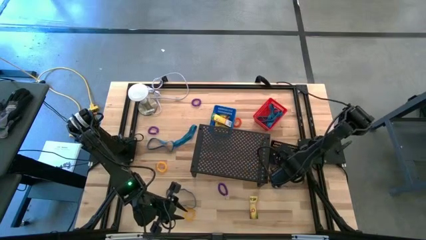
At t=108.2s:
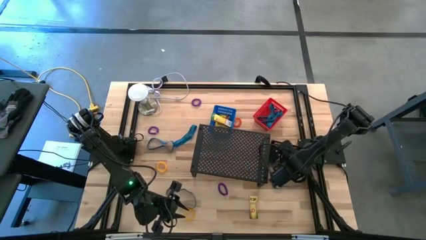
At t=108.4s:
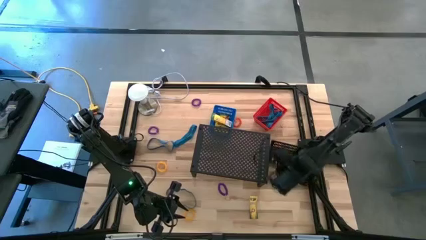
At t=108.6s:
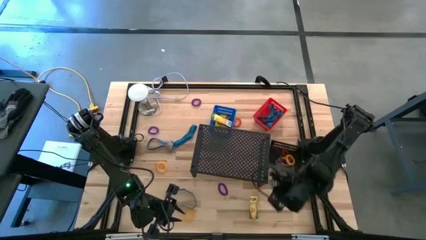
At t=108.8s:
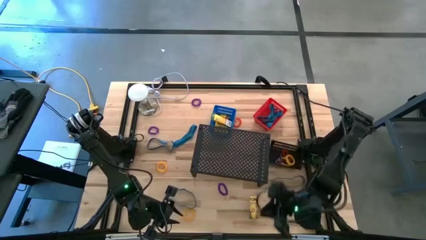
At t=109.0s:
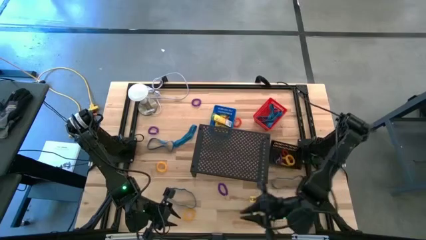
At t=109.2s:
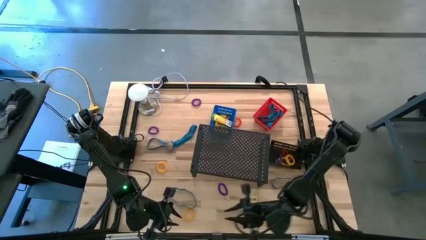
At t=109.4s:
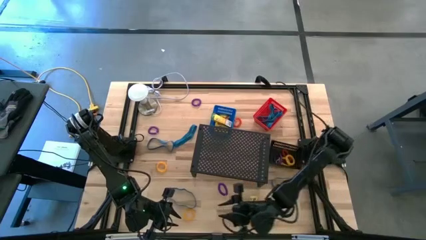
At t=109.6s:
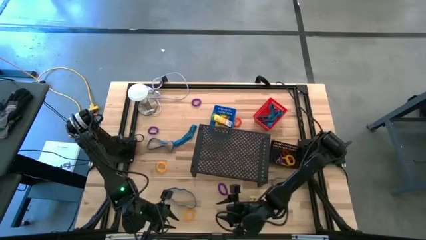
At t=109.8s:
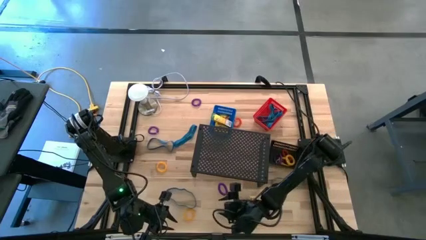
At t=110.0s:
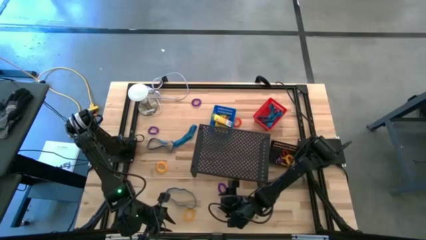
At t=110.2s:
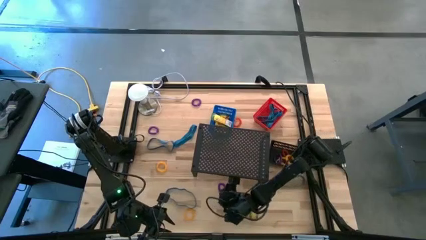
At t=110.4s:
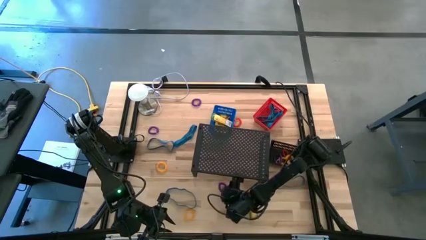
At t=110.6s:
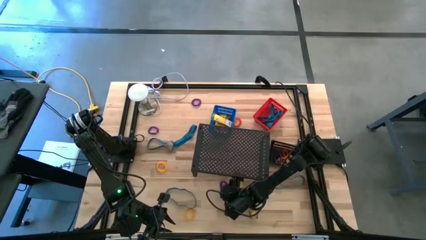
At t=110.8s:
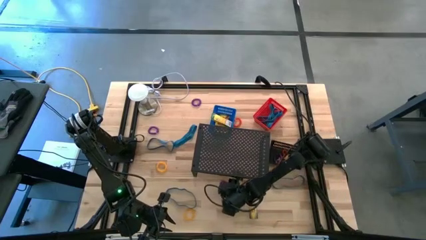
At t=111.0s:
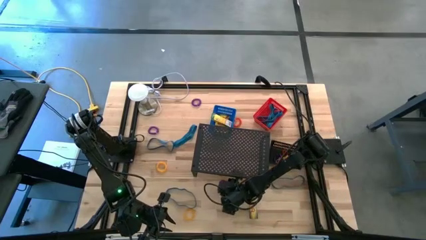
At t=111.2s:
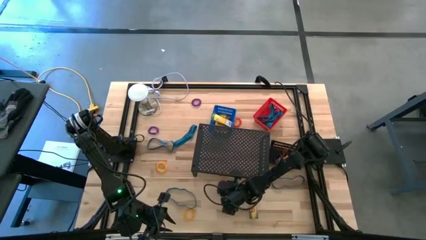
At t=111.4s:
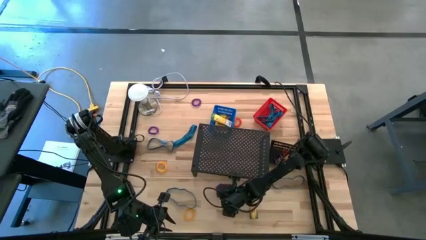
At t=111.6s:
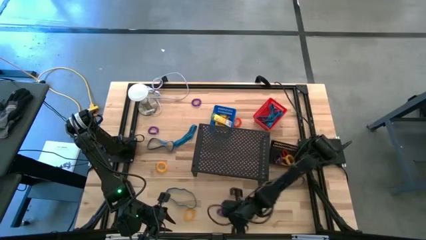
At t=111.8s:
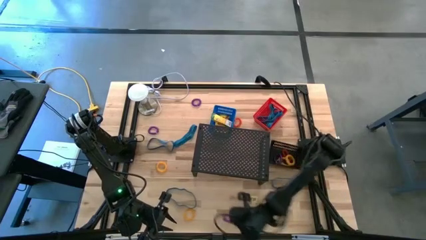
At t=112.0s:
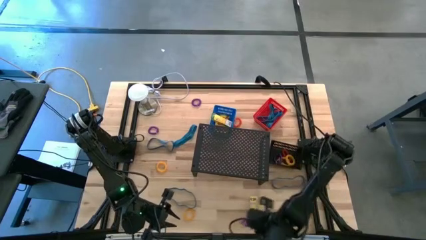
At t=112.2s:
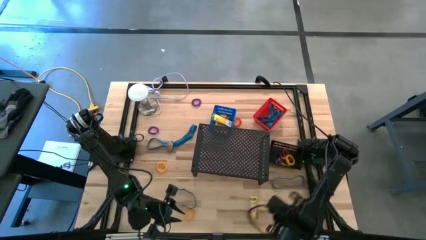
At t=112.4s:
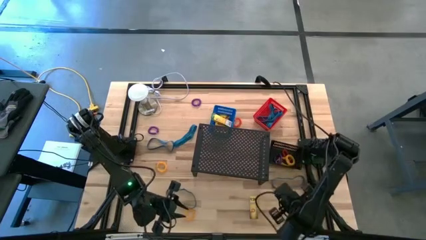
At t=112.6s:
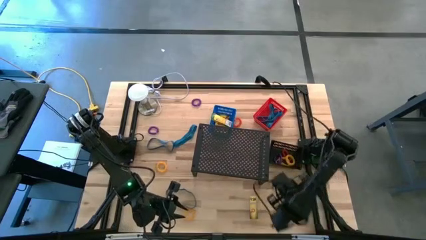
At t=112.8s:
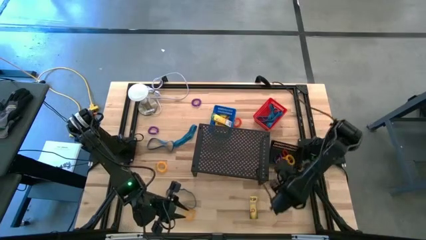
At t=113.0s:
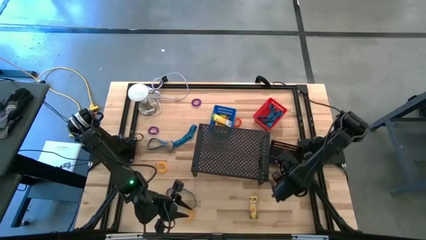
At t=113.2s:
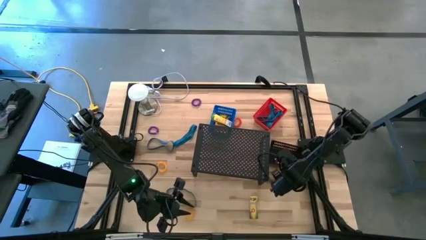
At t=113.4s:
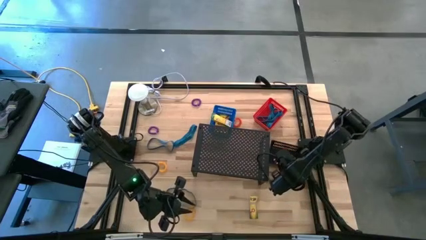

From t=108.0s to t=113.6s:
Task: Pick & Place Office Desk Supplies
Put the purple spiral keychain into the black bin

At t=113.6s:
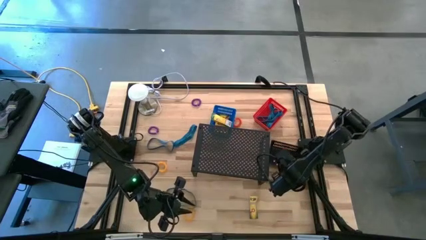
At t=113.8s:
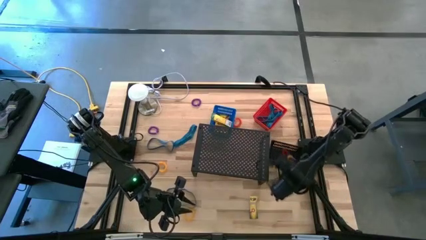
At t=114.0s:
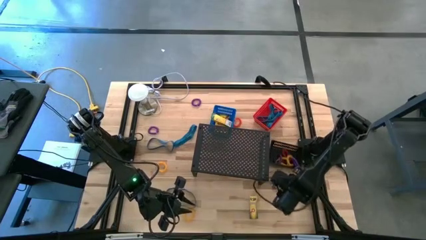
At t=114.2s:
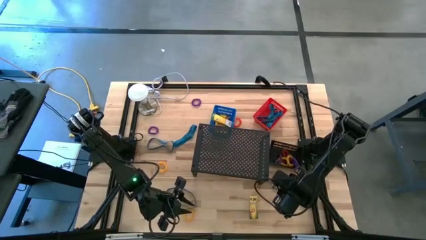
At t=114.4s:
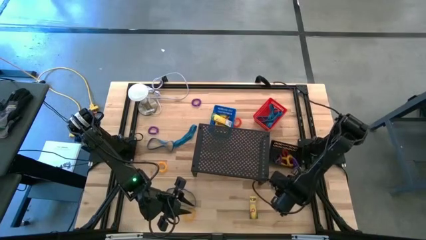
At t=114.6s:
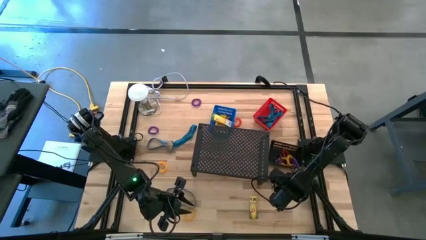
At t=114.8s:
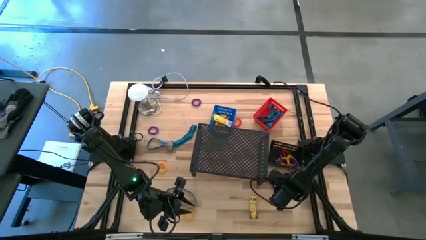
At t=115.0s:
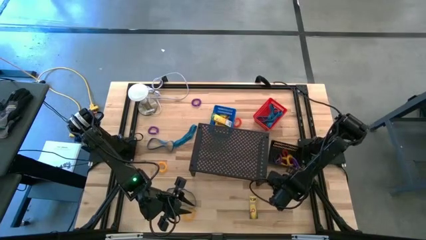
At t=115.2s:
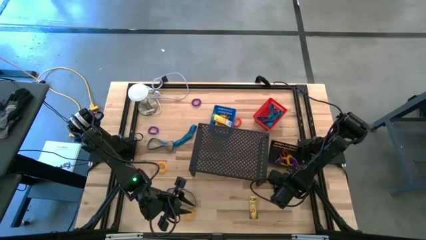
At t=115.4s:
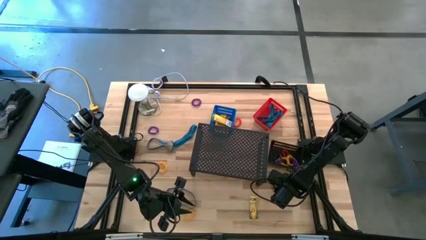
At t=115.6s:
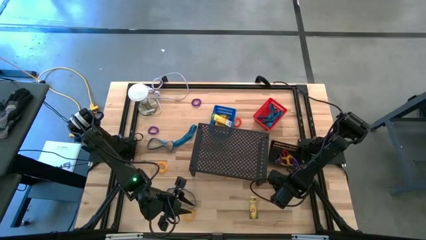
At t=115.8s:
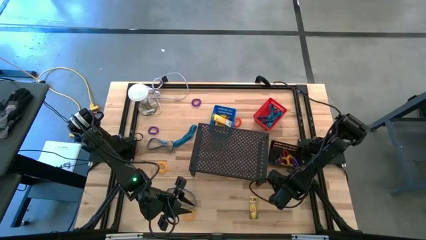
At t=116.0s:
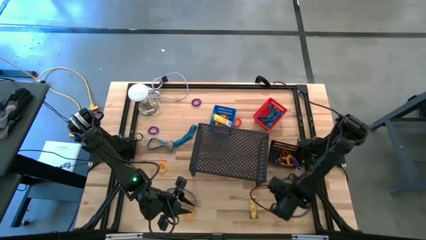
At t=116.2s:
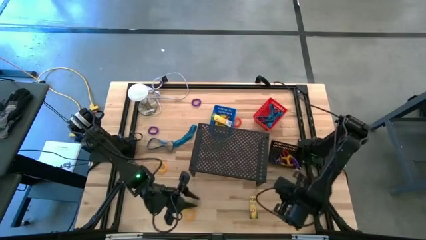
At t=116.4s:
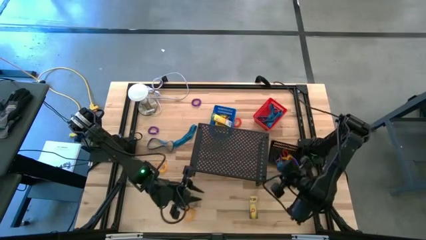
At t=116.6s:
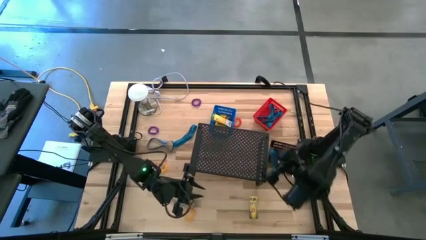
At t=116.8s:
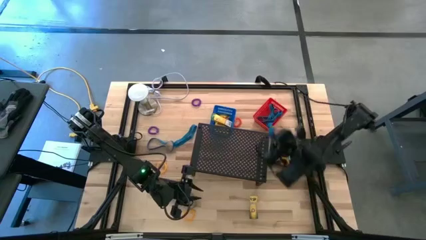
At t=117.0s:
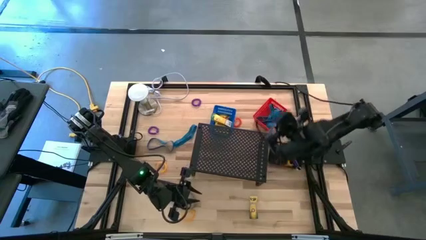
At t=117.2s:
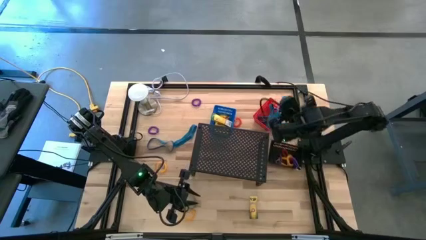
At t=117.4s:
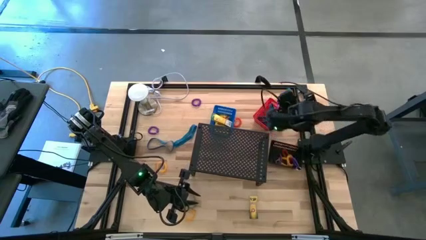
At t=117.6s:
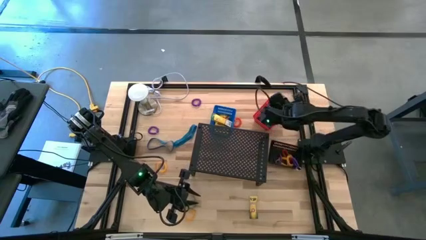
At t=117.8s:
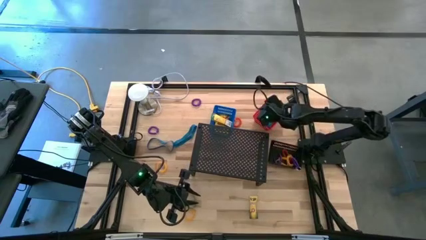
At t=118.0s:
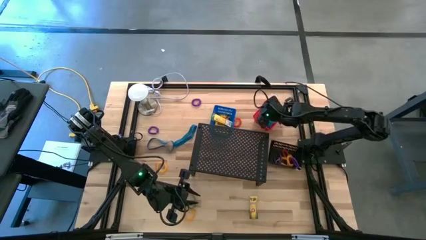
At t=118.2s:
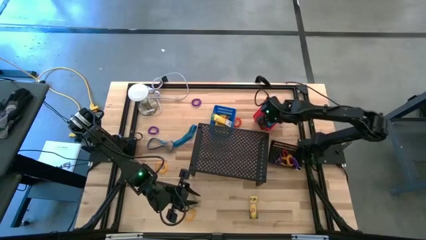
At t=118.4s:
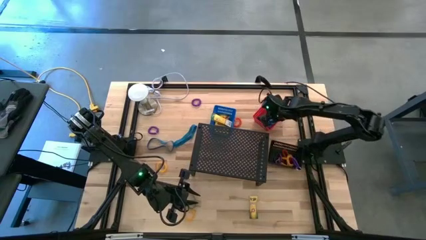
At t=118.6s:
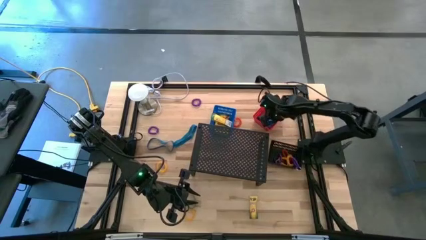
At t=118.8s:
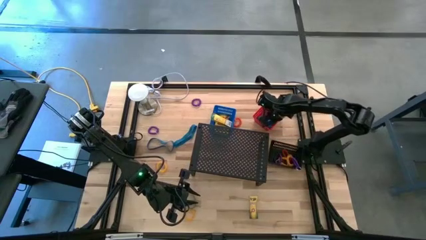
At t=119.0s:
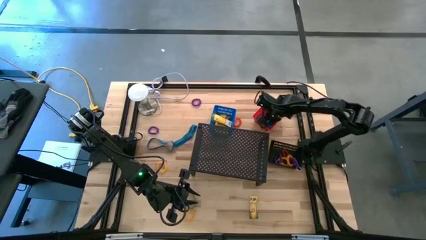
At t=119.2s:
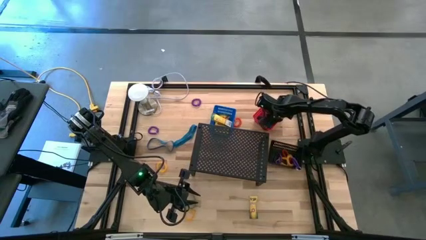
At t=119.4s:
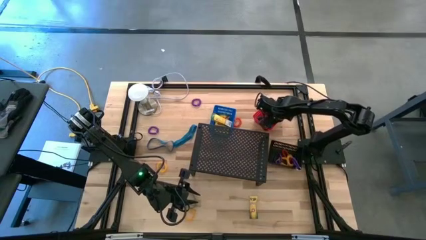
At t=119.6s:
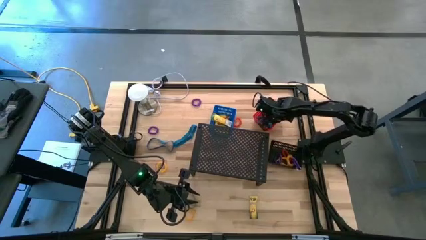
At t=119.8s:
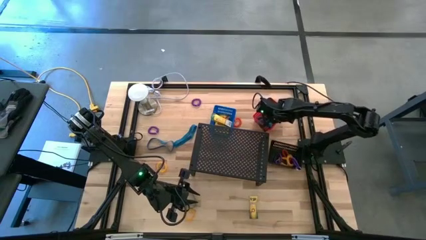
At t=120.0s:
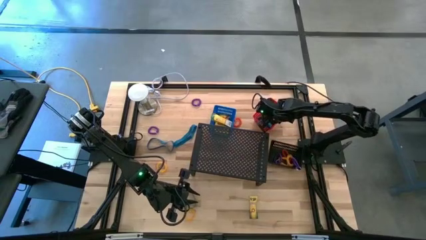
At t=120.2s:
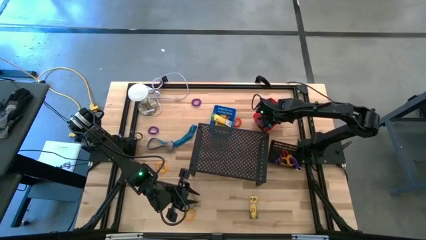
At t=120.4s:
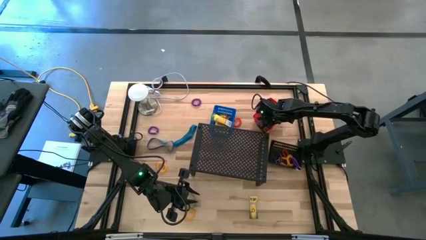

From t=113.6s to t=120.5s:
Put the blue rubber band into the red bin

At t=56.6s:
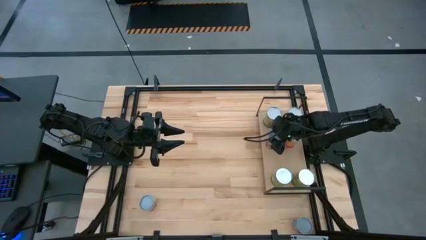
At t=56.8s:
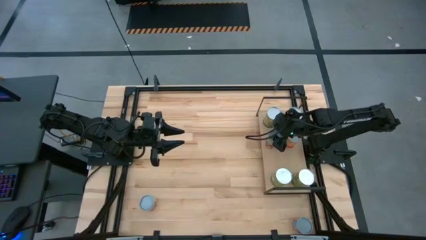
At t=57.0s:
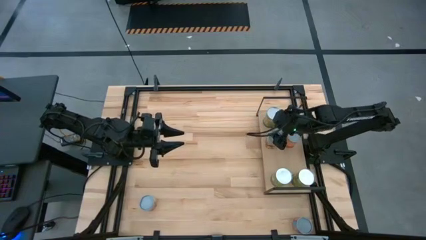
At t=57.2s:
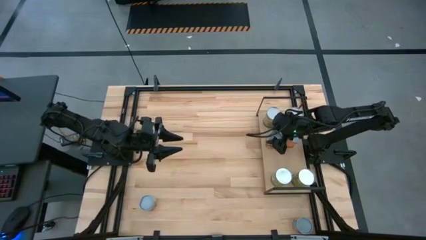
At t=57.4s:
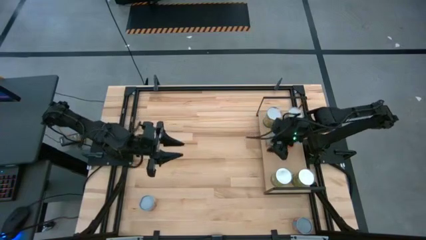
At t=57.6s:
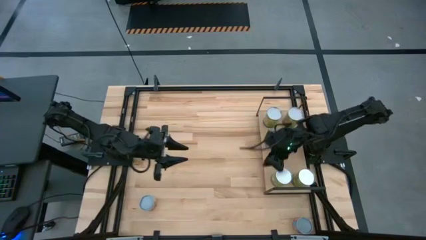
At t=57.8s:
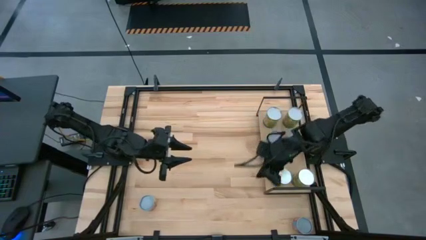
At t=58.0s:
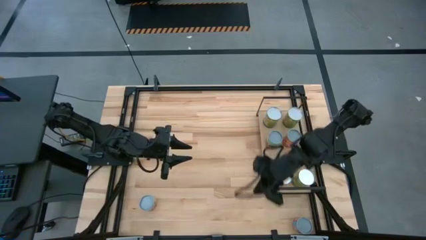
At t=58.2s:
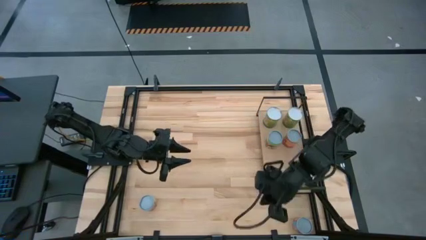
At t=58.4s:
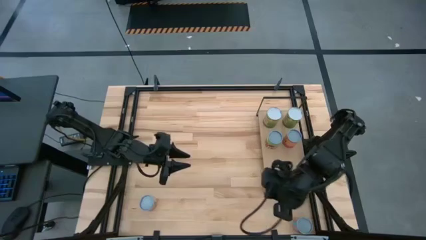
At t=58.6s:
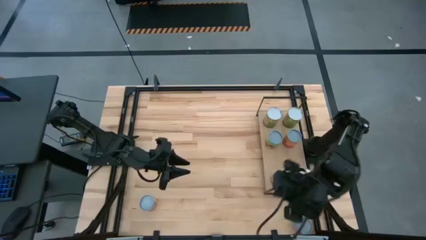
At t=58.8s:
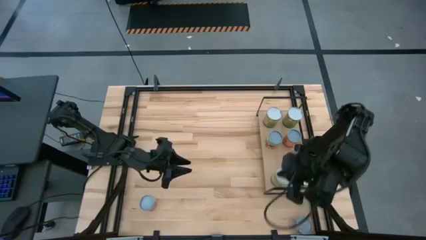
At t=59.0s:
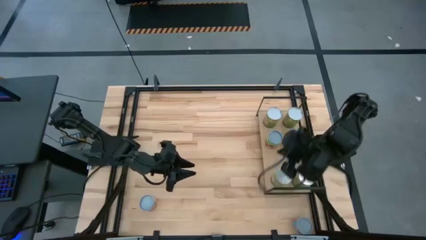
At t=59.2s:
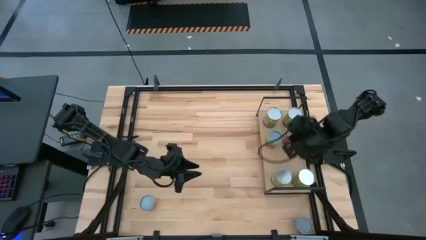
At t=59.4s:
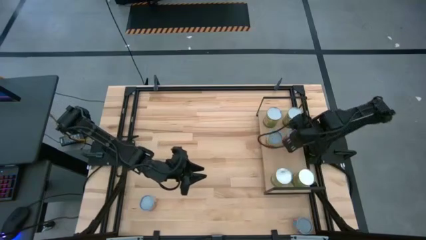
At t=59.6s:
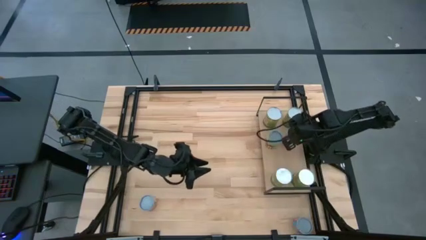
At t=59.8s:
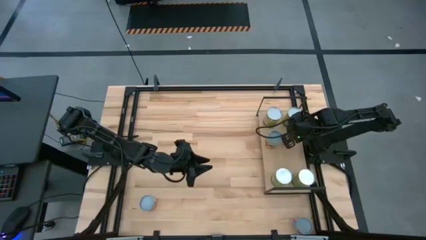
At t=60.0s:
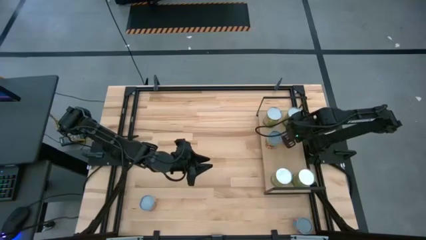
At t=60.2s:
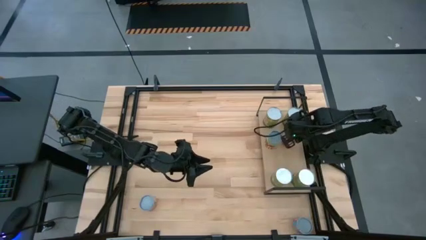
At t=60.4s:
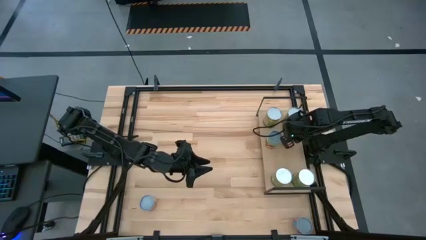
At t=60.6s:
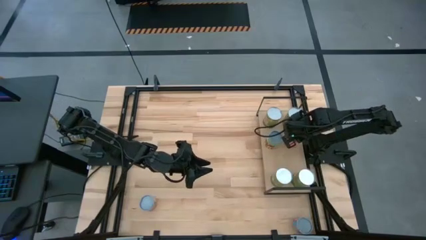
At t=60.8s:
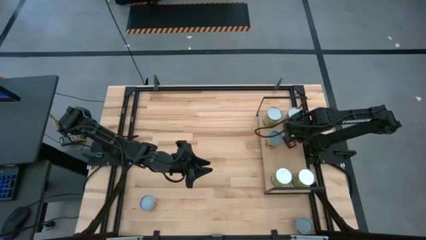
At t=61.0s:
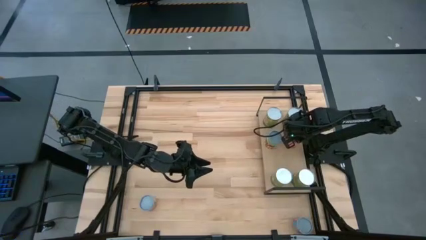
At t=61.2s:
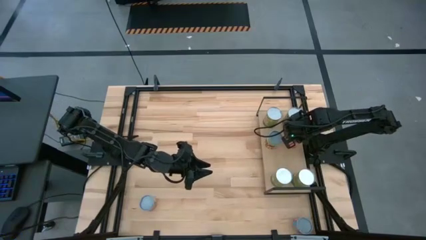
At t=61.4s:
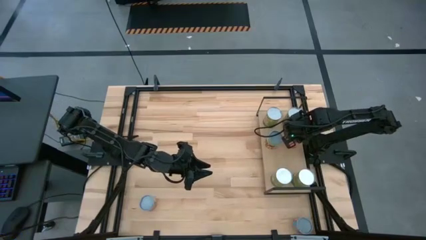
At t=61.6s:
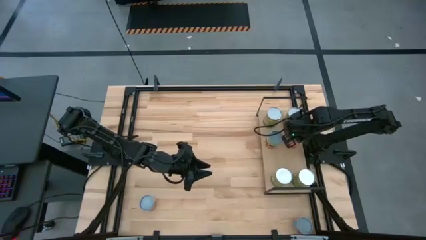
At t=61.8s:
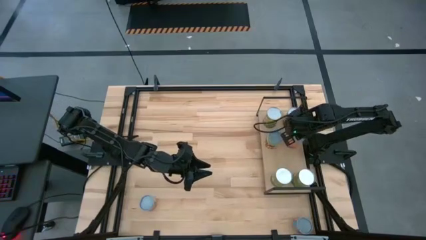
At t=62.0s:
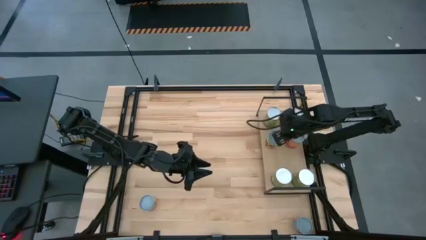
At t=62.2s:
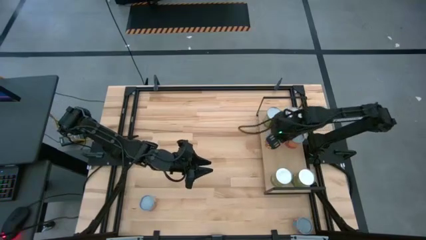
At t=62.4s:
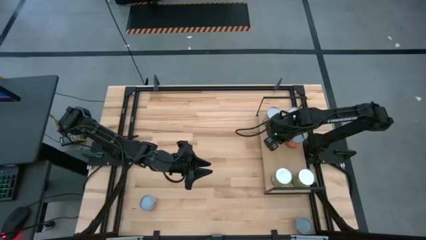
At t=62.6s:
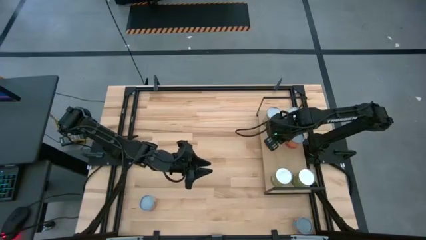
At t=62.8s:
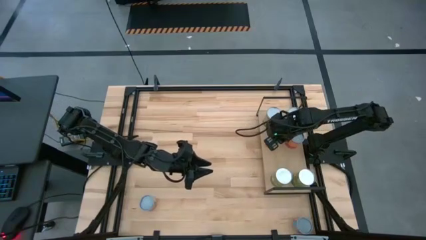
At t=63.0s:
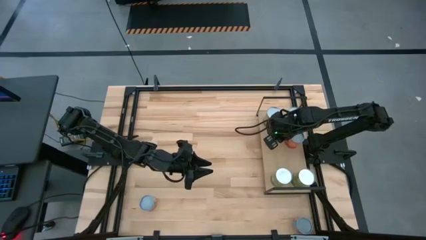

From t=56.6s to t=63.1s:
Task: Pick and place cans onto a shelf
Adjust the cans on the shelf
